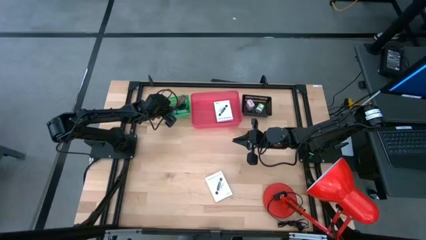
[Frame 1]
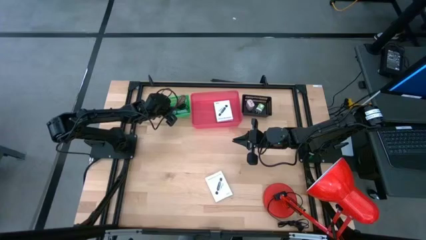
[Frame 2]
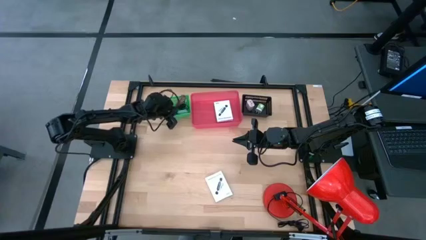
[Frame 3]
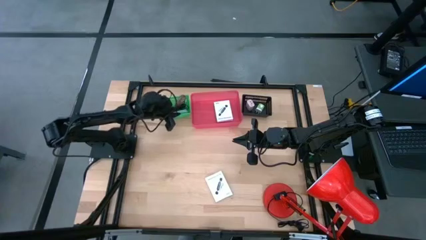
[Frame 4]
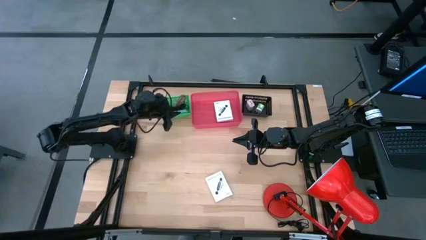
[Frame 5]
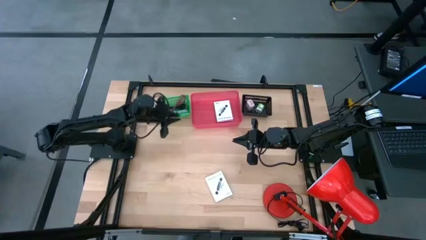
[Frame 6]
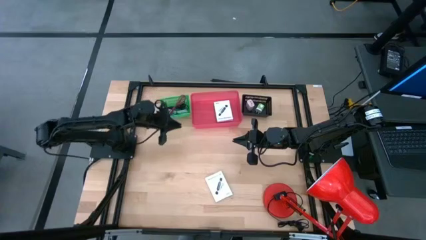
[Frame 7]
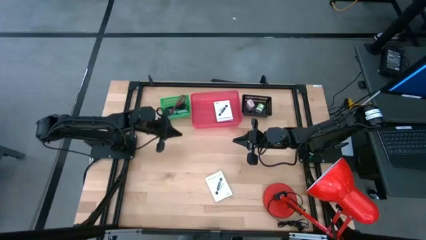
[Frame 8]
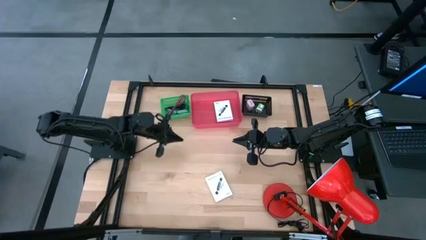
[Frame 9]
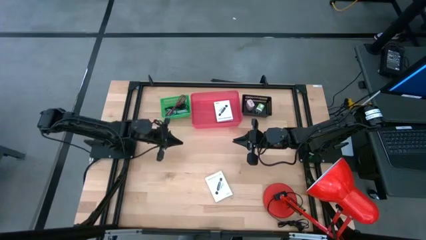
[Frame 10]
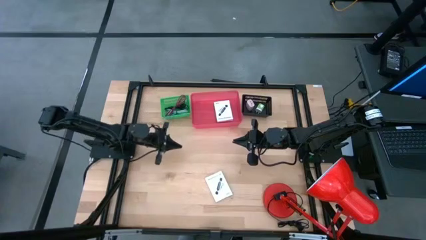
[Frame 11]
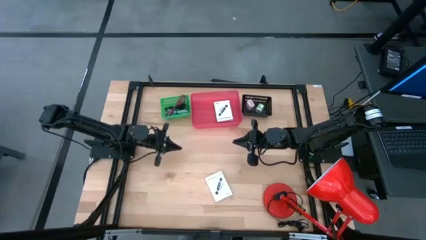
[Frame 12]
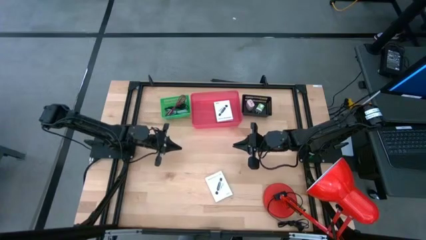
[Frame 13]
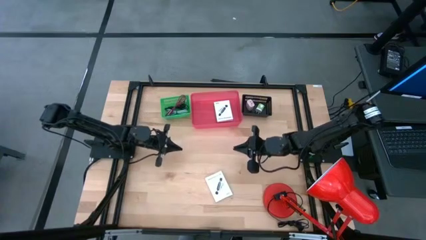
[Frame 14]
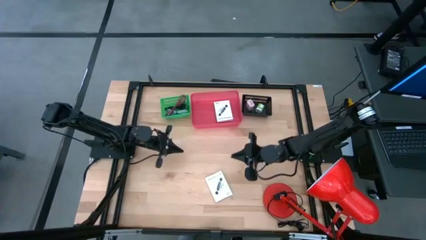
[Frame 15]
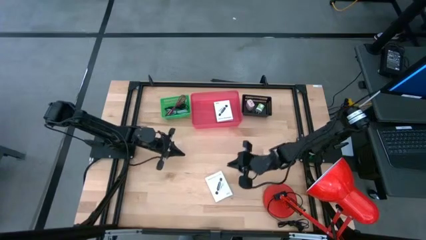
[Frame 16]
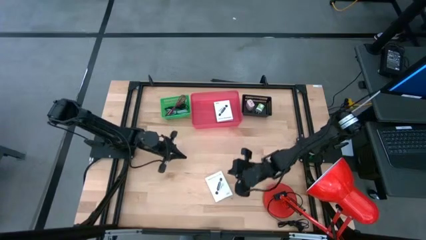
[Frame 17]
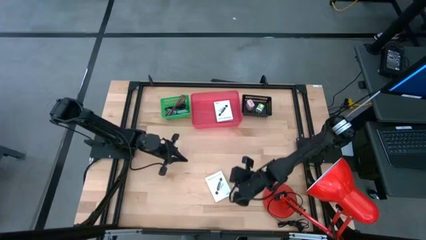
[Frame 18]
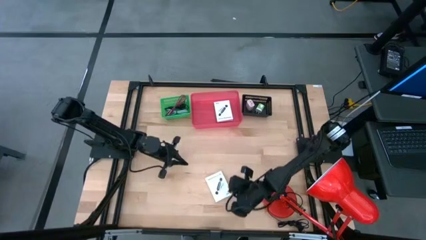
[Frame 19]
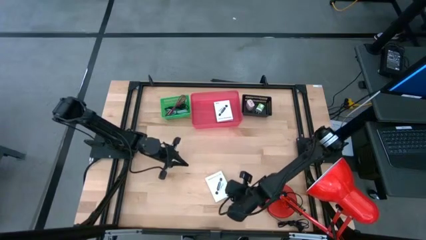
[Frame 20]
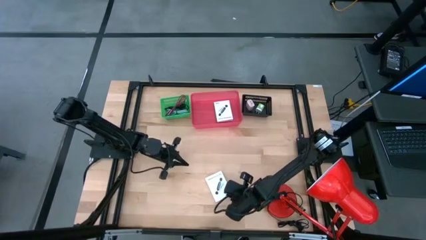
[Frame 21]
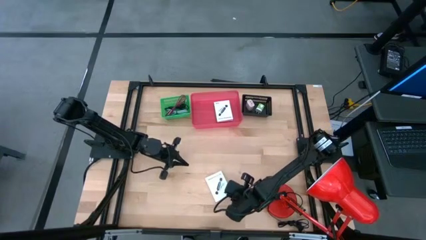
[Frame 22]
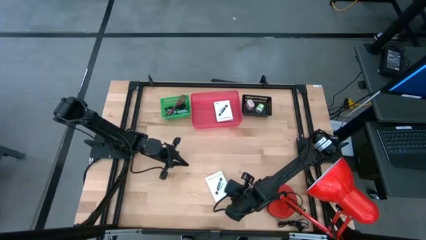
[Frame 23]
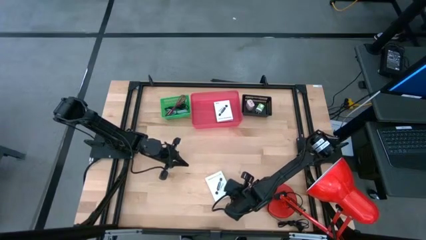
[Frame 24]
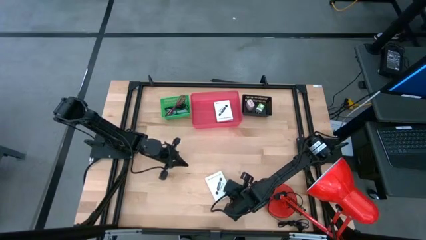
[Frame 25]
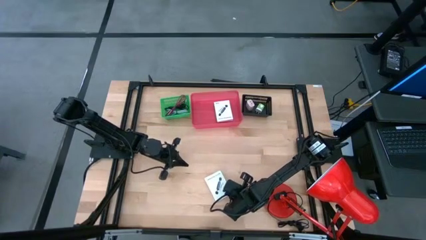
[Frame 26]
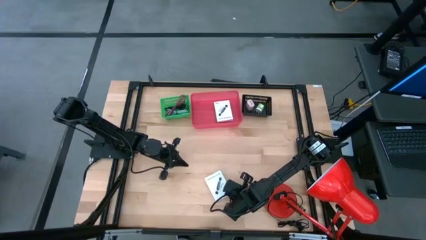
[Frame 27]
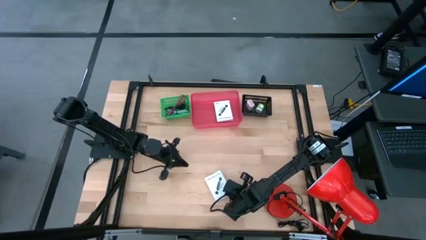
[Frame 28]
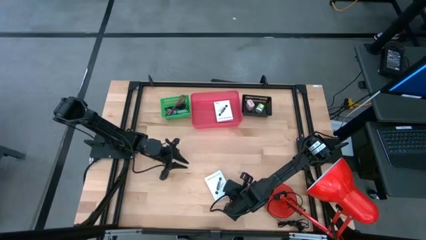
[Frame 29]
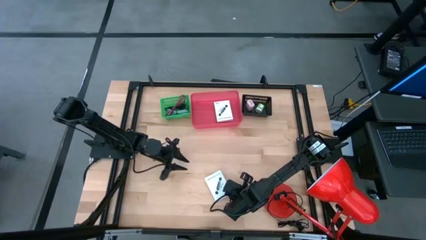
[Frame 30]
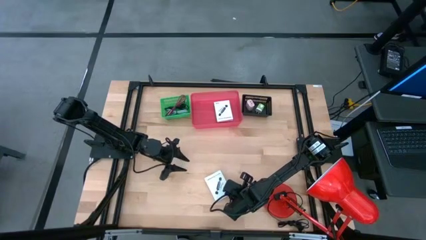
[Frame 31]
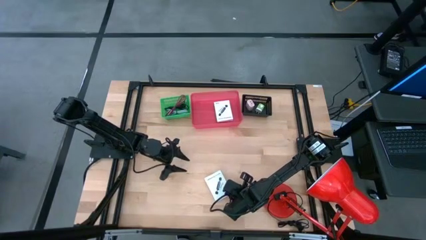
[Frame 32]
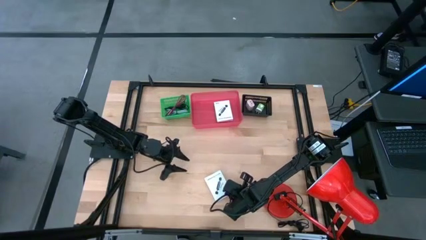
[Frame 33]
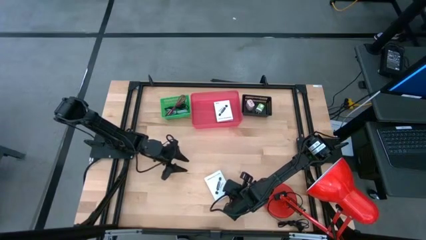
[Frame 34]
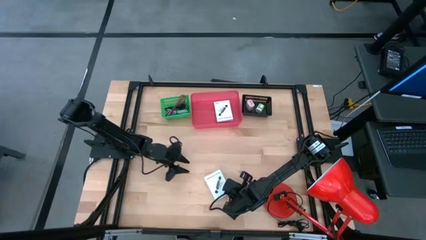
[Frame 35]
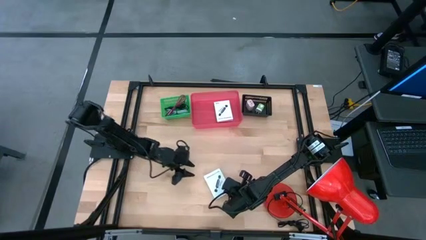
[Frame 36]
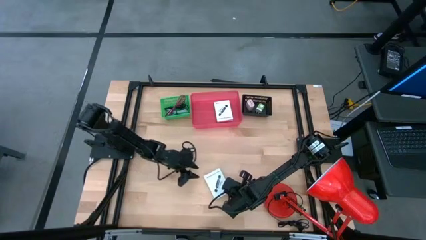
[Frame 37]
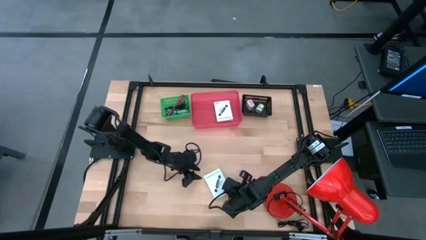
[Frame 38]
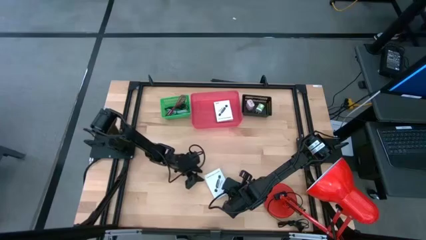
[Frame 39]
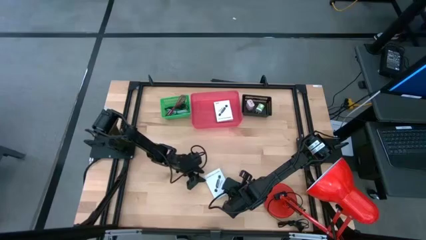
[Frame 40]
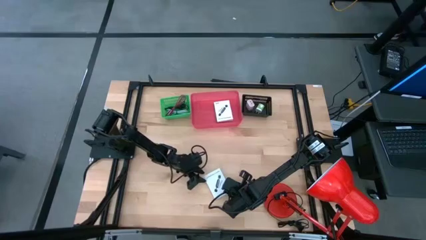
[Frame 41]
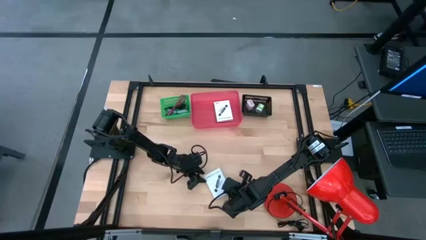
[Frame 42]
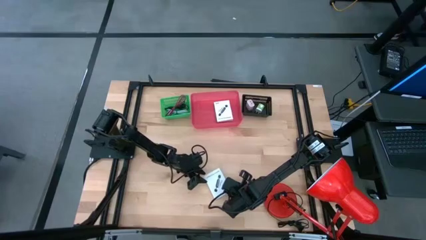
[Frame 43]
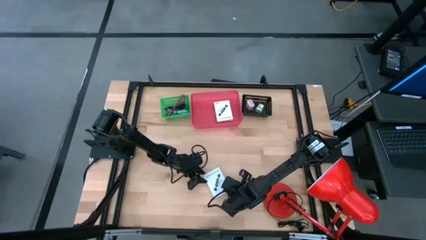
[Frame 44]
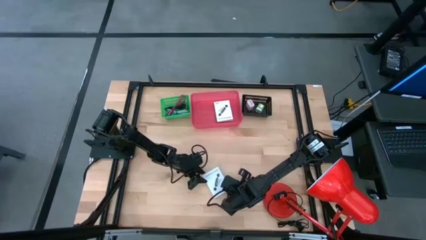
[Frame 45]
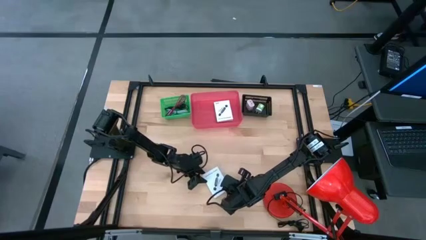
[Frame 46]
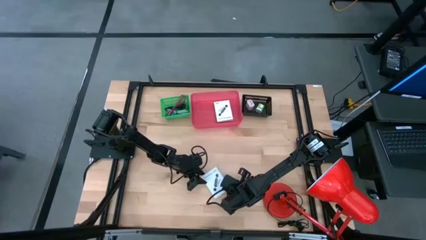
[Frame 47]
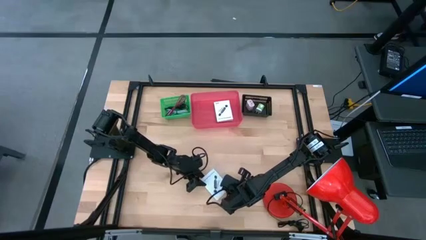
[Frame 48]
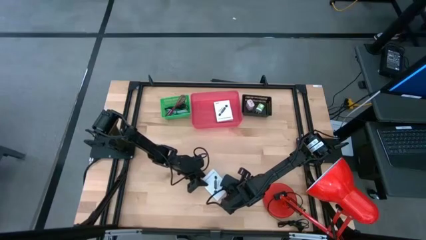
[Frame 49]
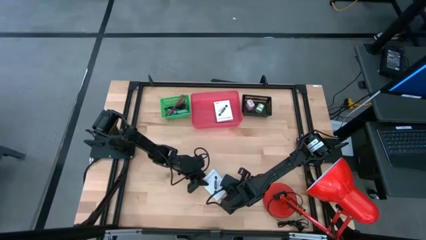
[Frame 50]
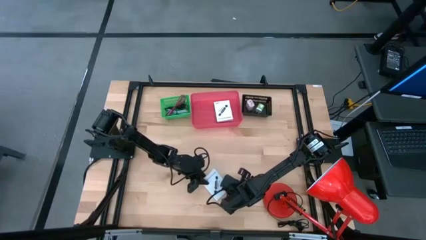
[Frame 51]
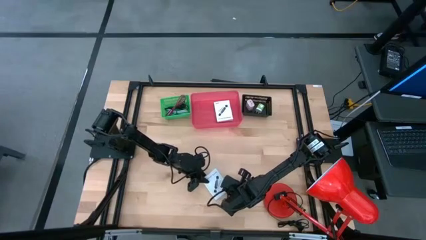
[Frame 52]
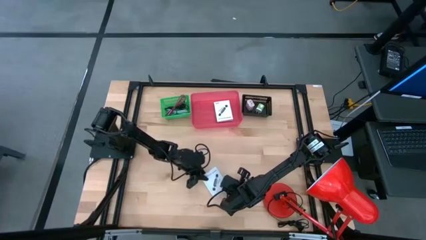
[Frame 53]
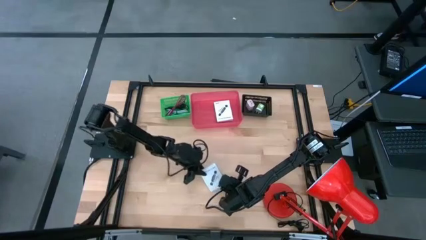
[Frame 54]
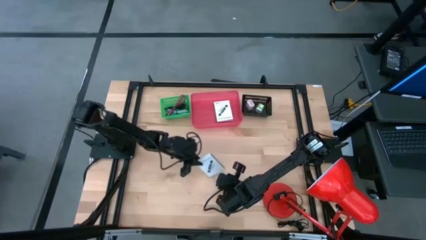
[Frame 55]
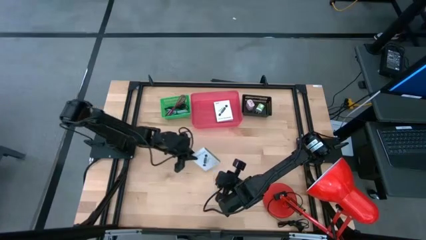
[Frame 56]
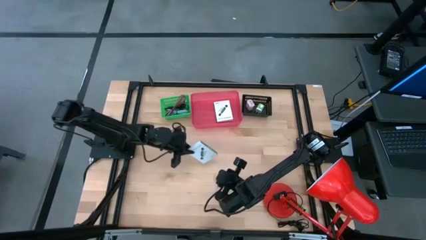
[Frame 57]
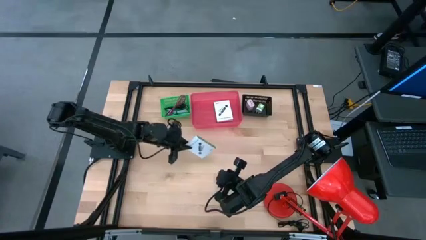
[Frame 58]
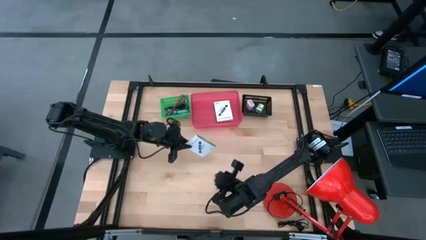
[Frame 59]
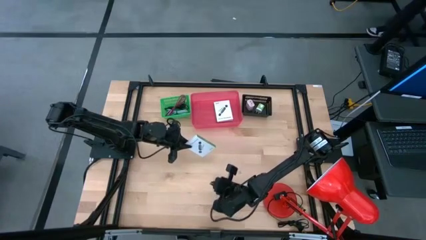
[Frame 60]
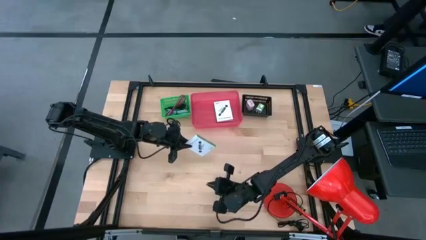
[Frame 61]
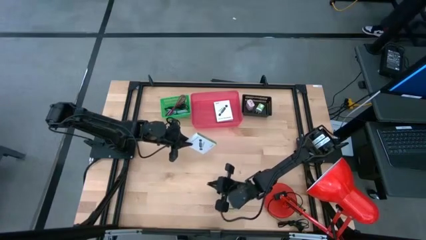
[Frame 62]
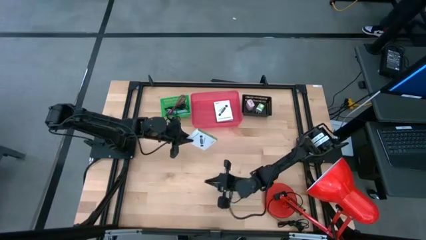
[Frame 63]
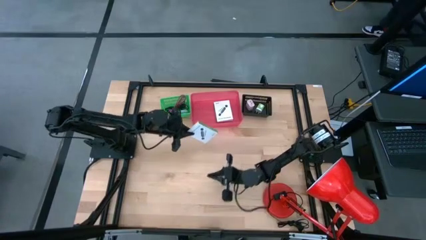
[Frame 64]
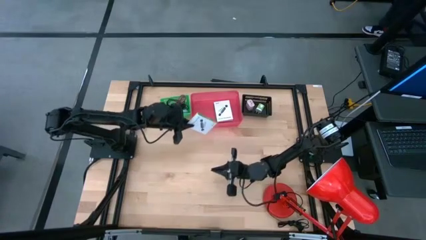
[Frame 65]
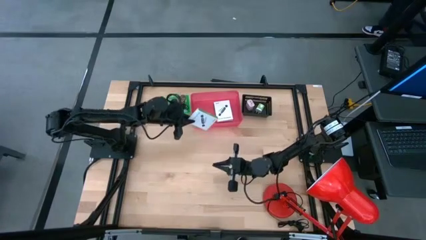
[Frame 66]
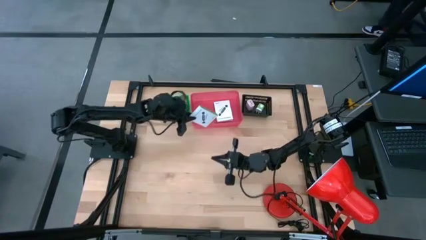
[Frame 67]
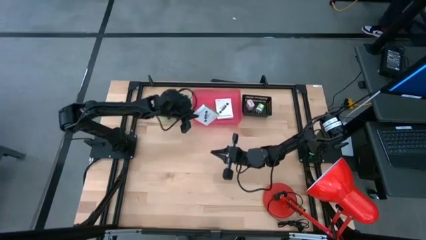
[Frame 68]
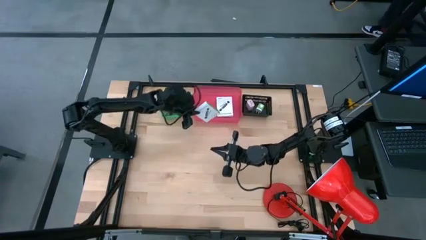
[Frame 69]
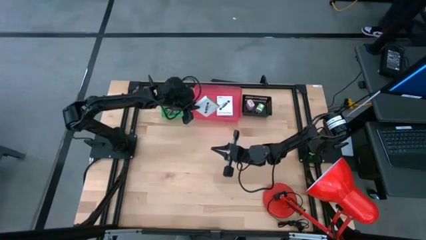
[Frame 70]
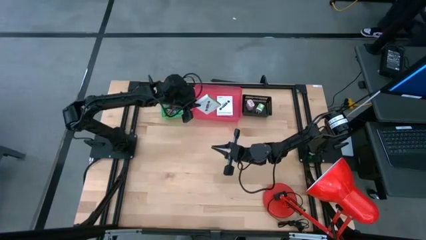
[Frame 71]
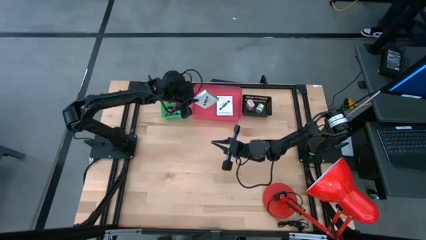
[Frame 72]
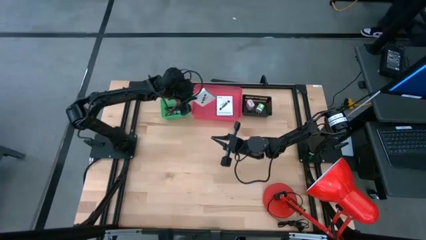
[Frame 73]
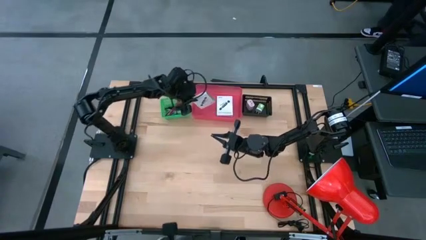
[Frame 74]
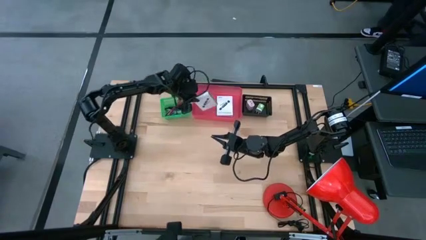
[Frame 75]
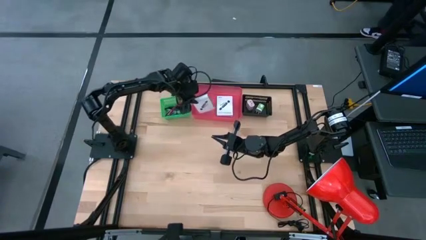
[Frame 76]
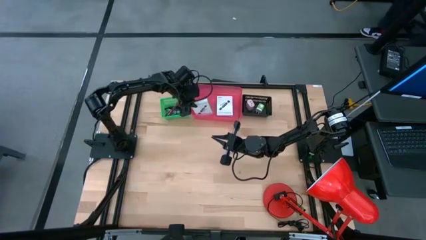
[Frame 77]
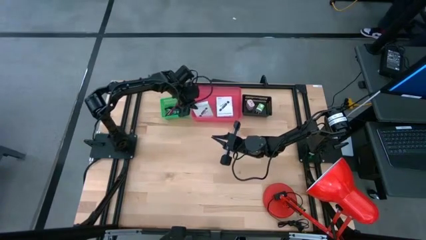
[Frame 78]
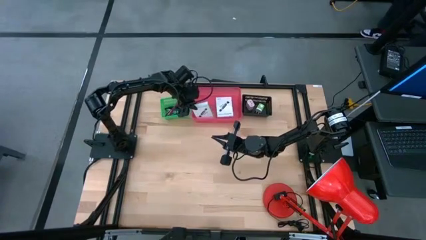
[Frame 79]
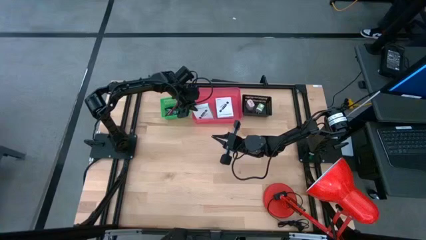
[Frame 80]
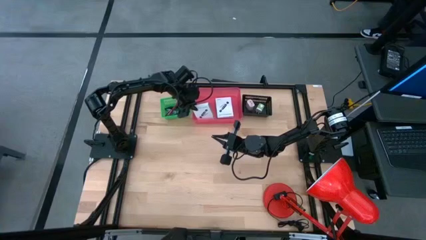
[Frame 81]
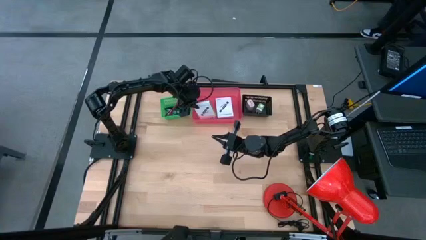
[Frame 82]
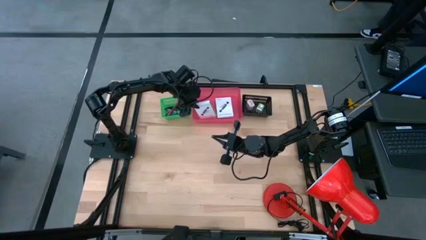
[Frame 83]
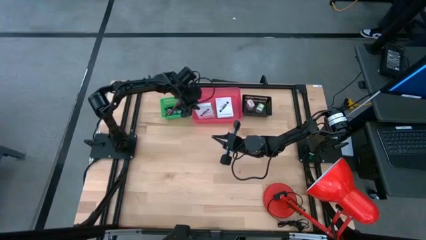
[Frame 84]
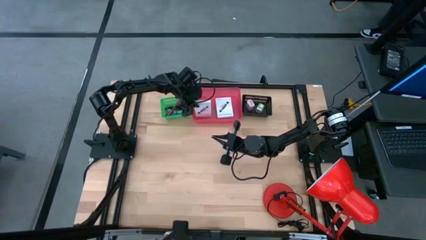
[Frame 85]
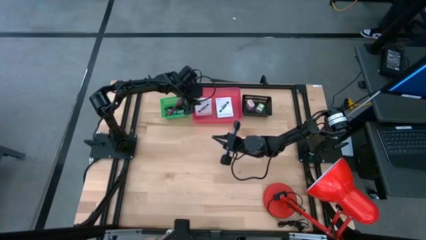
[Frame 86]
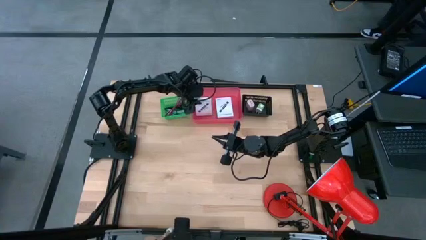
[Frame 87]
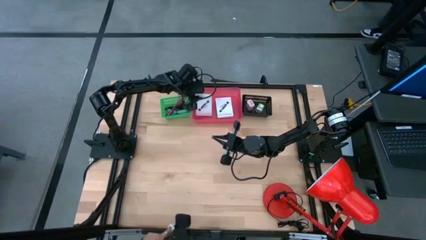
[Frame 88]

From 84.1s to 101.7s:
Task: Pick and place items into bin
Put the white card reader box into the red bin
